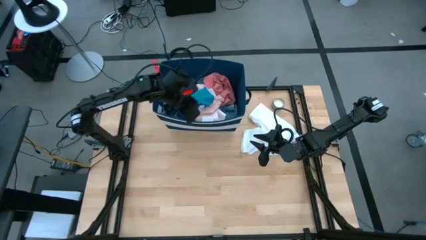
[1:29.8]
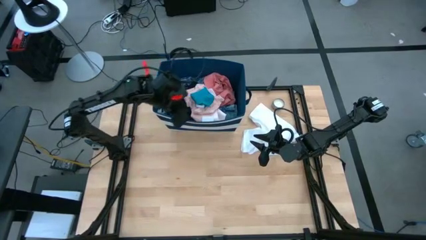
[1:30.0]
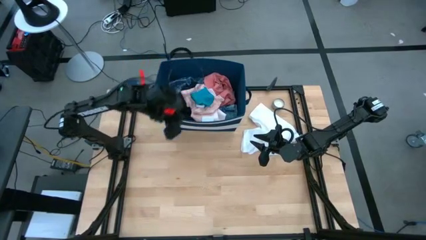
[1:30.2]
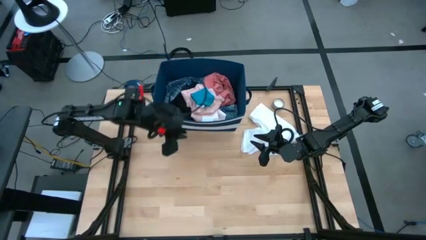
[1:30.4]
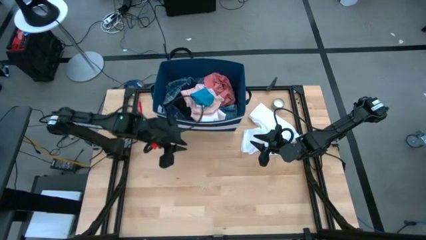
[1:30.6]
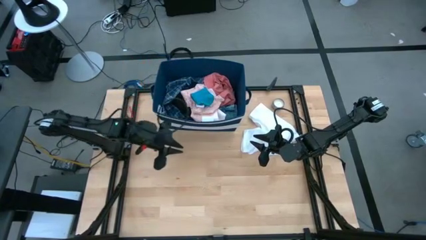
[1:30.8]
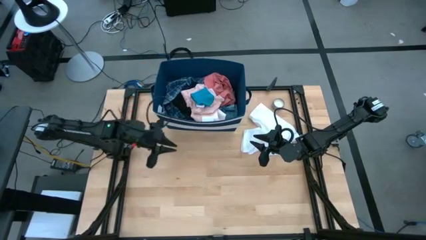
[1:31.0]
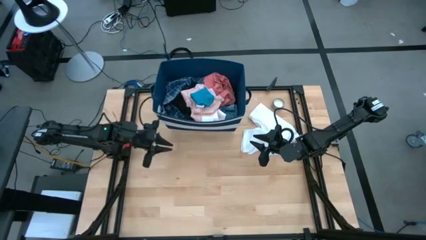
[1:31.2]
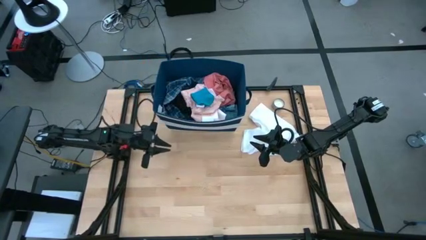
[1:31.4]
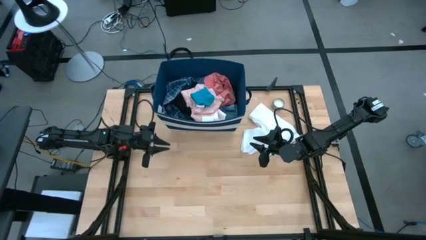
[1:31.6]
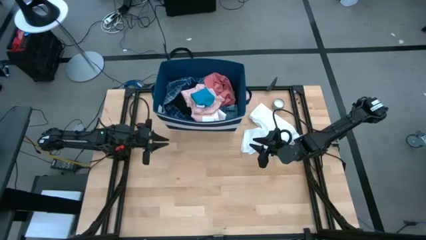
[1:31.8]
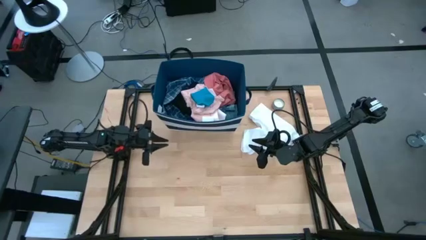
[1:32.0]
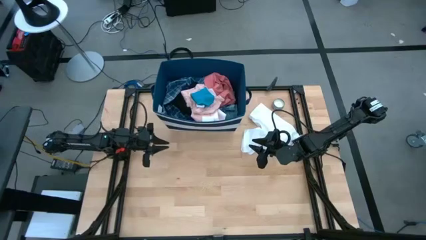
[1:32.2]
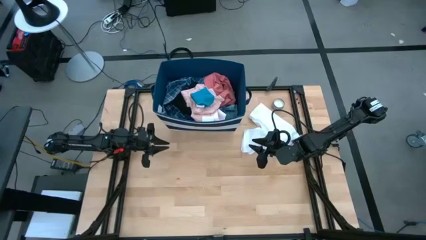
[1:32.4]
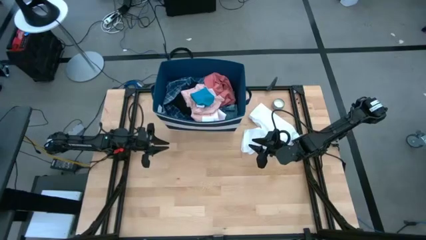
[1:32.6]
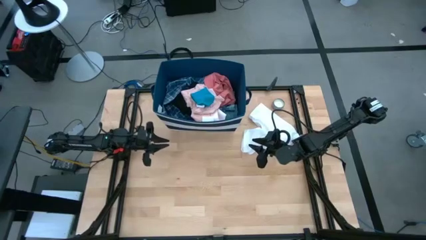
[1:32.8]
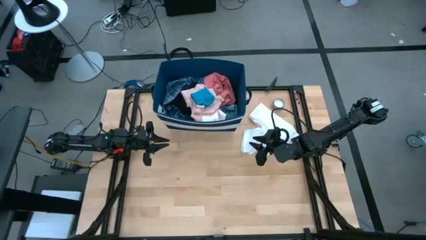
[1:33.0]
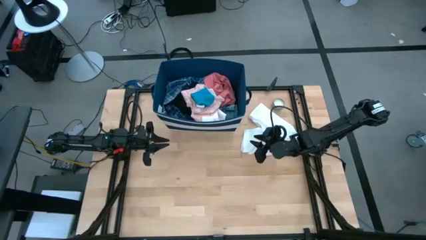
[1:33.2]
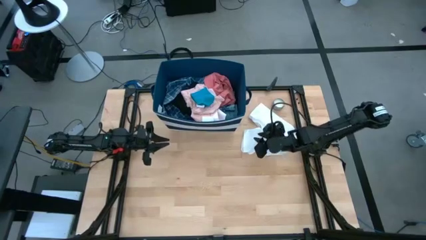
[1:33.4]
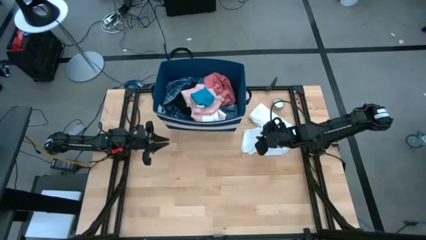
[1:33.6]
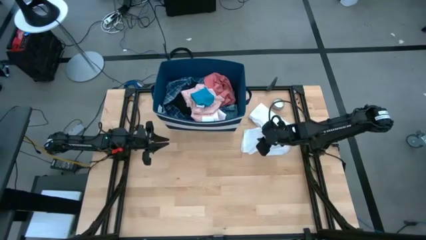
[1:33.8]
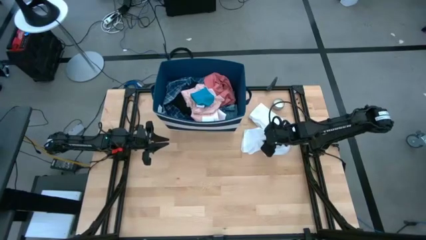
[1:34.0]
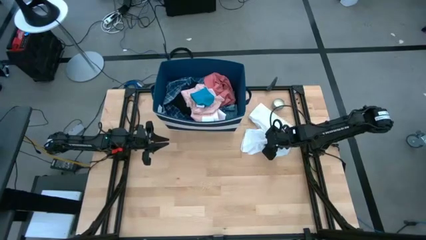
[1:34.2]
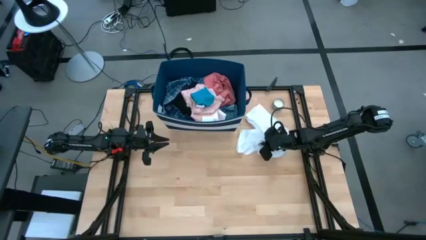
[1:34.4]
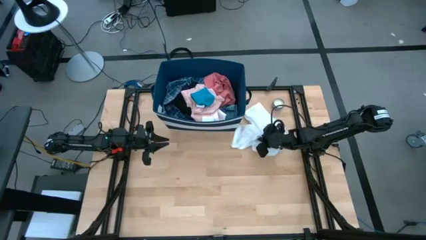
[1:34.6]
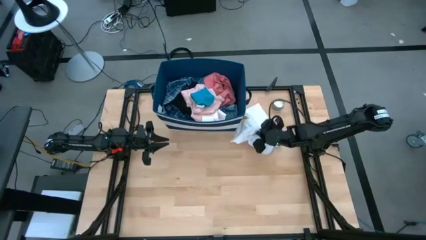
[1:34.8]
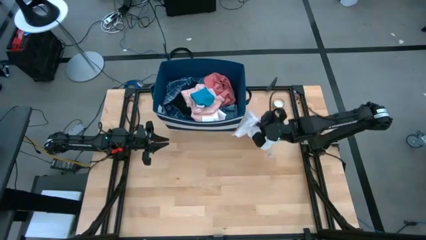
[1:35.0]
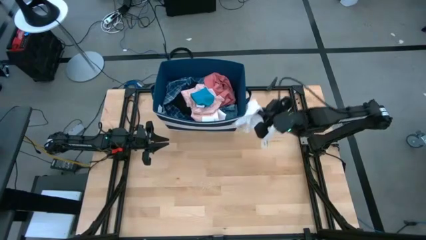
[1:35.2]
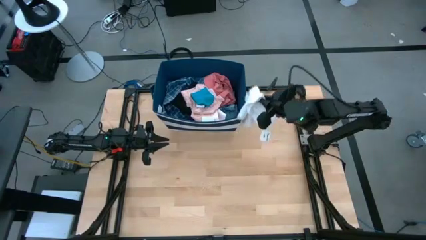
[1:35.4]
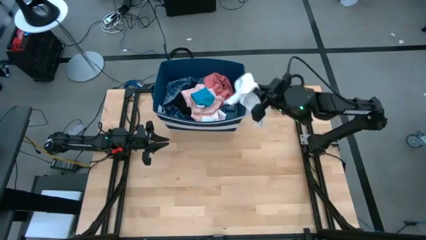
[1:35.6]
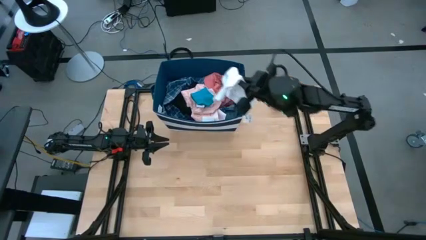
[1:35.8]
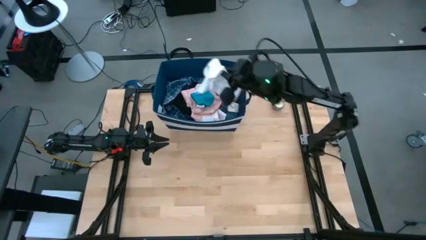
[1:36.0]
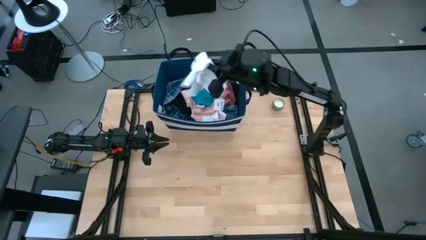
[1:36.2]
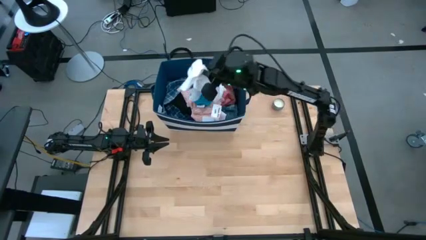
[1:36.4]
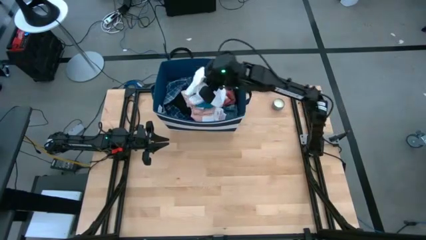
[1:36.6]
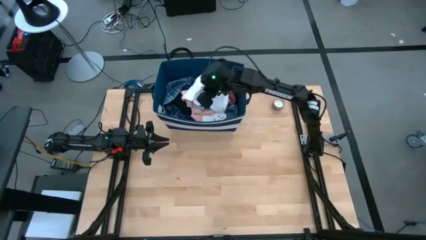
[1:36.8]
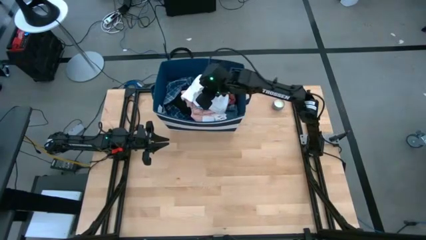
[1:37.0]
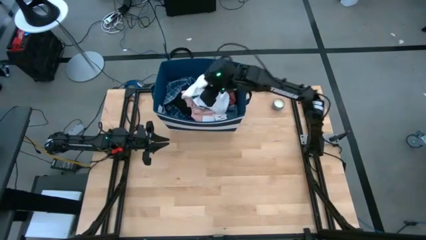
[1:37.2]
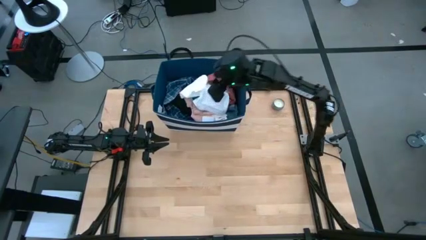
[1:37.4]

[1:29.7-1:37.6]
Task: Sort clothes
Put the white shirt into the blue laundry bin

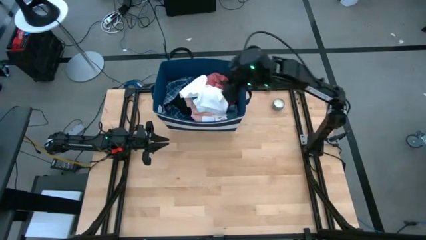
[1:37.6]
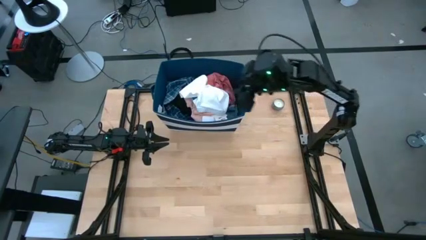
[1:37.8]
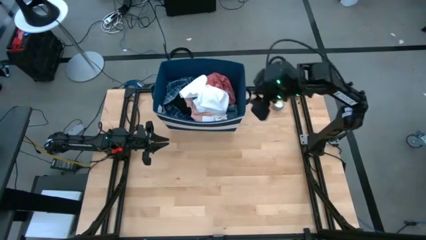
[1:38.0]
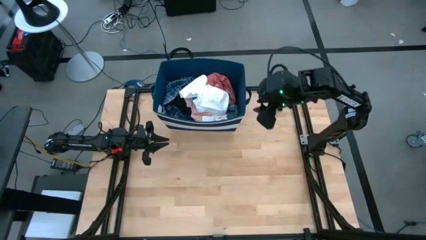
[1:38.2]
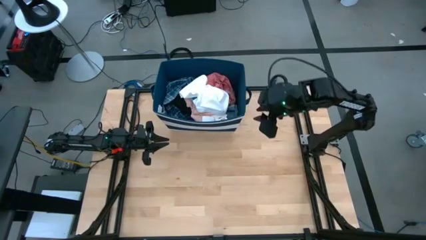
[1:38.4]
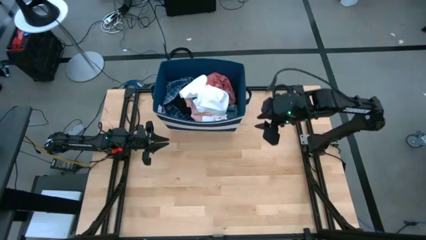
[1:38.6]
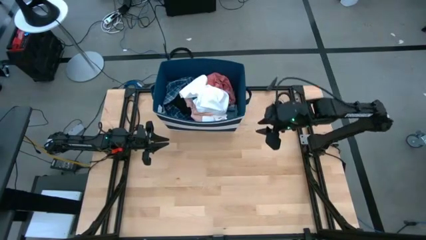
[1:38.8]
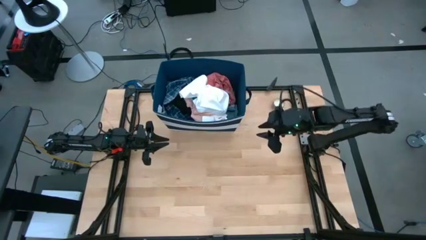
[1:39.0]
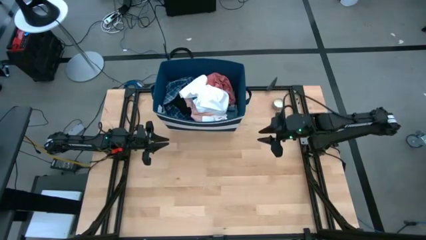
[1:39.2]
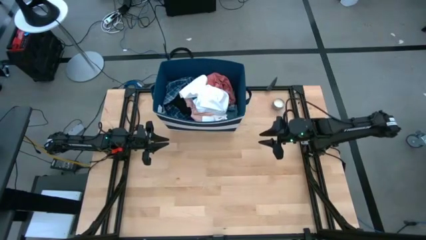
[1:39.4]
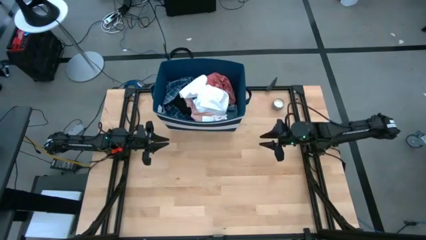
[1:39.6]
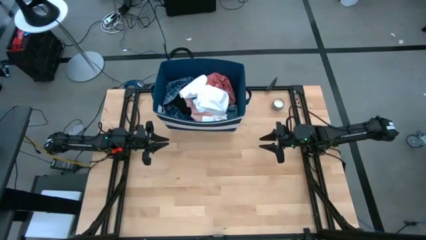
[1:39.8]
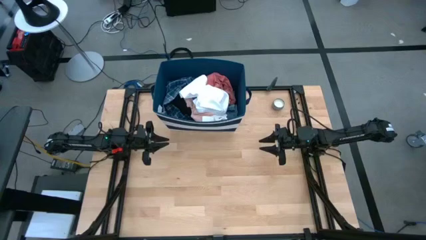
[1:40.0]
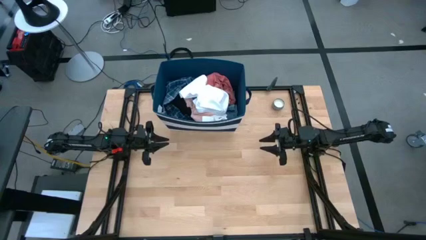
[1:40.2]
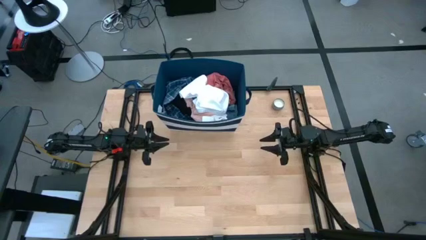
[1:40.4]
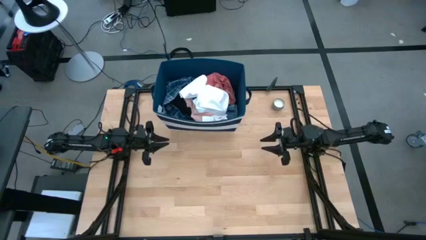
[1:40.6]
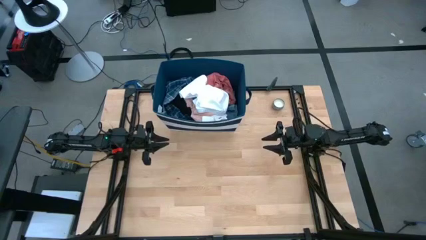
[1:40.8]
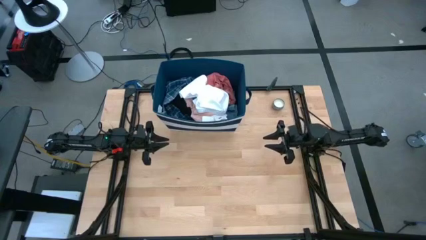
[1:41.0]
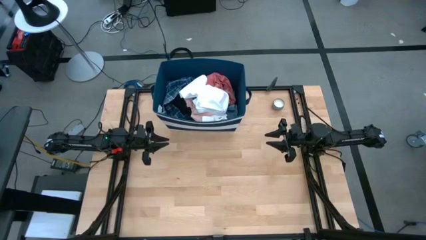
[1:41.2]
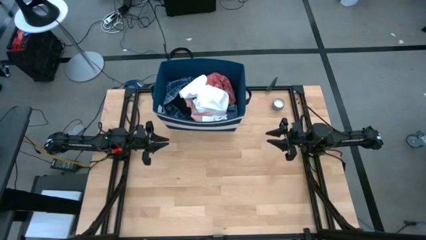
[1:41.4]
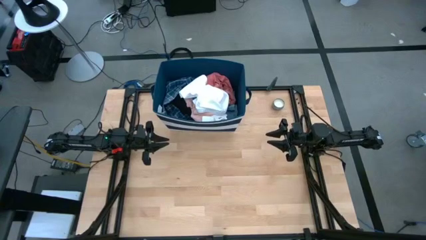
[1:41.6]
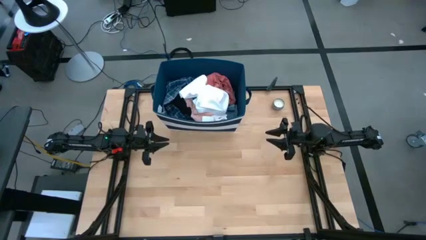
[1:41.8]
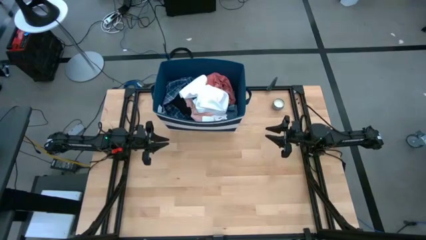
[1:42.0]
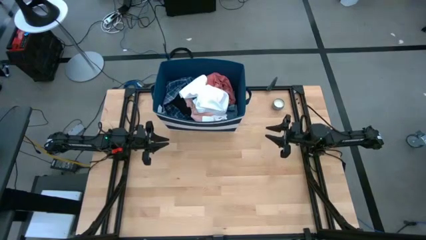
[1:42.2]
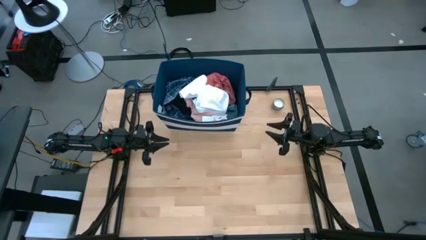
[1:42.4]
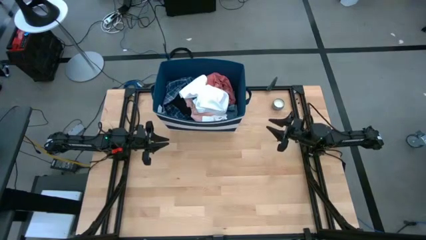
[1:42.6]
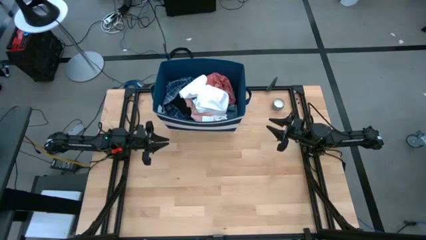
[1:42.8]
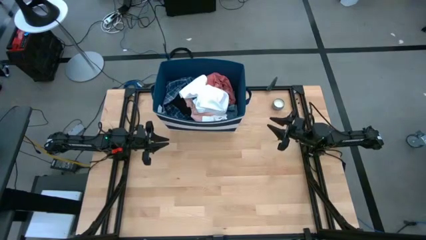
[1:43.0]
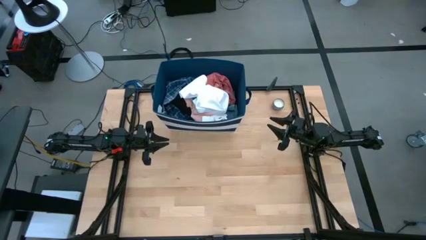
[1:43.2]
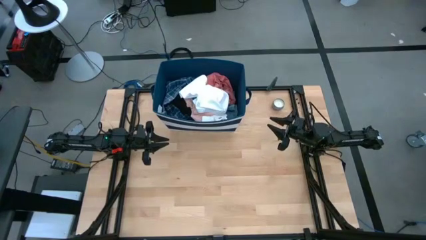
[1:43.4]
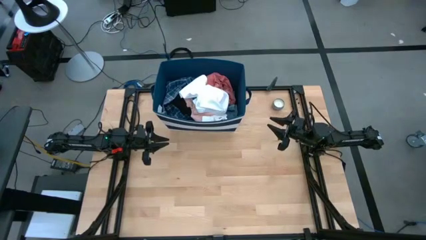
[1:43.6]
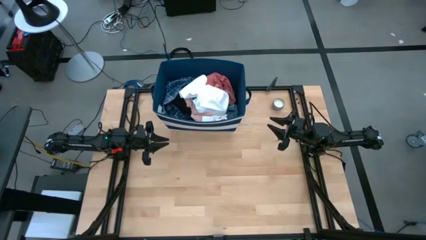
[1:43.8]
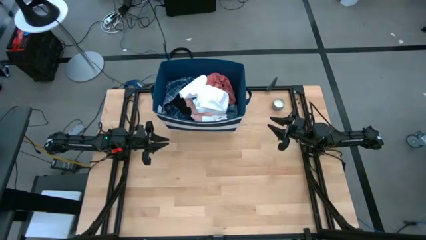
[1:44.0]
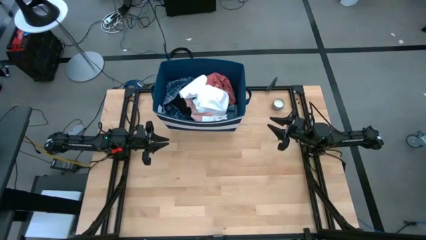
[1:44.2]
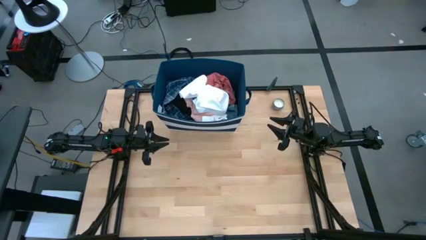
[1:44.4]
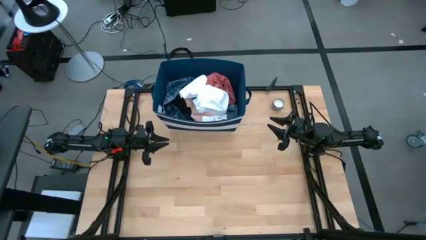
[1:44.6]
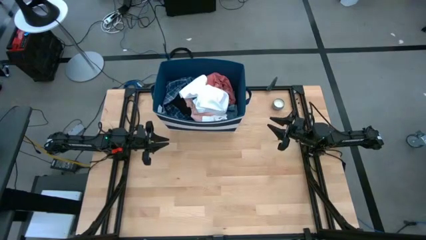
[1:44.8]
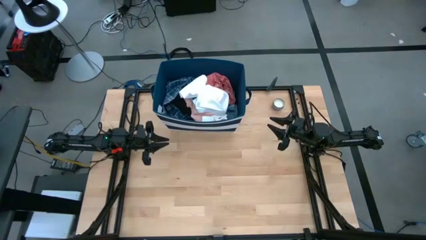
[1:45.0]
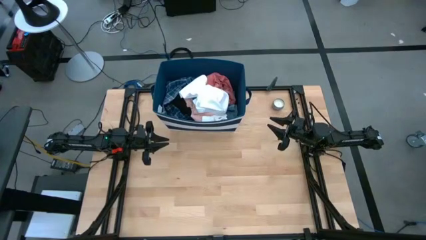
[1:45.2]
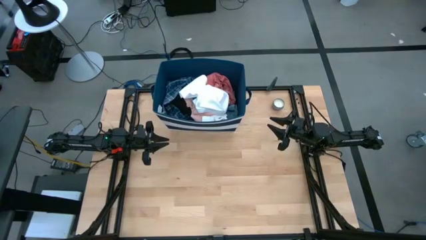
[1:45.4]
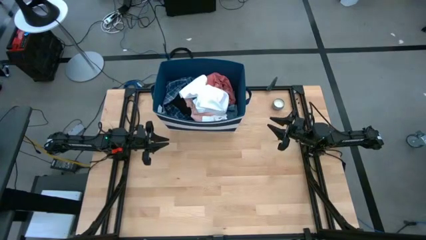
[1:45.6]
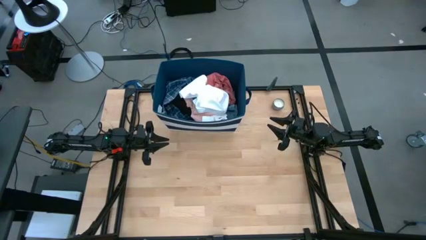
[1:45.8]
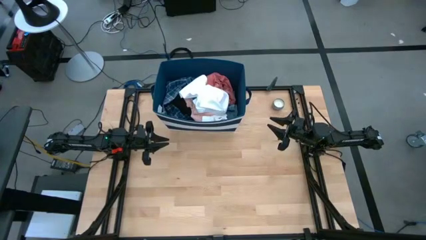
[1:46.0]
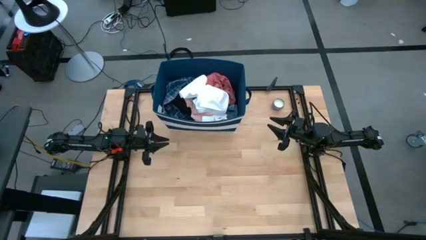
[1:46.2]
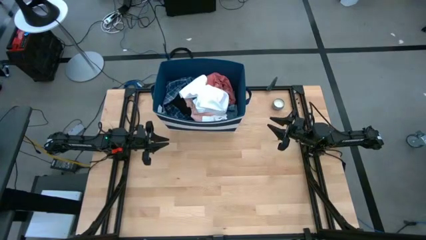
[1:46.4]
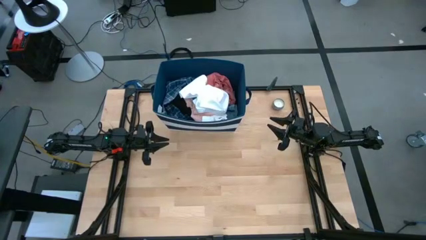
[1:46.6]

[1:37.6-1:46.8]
Return to Home Position
